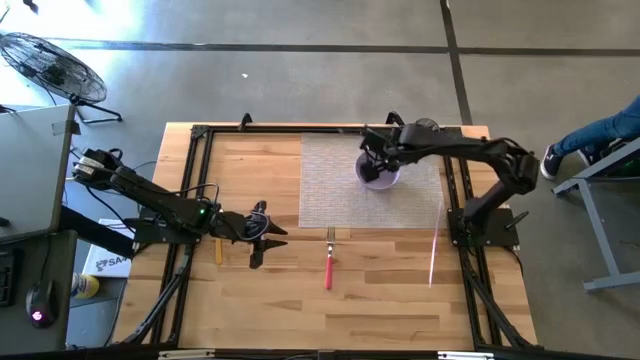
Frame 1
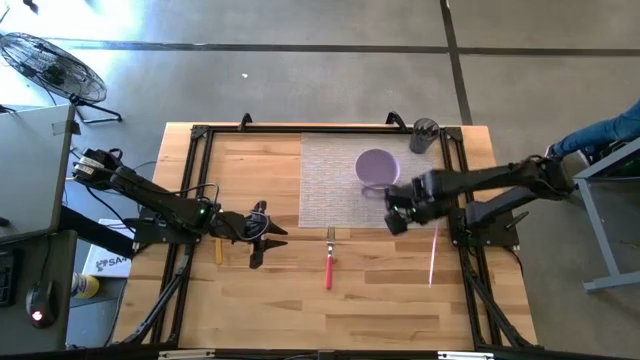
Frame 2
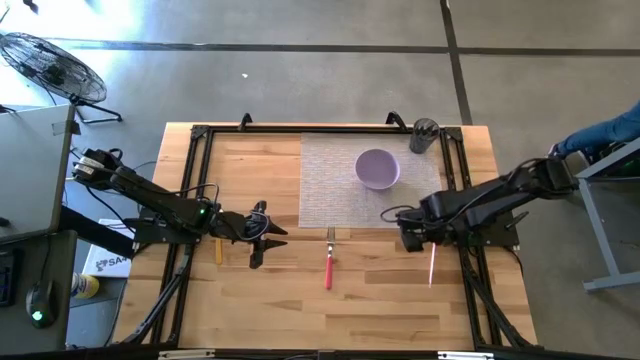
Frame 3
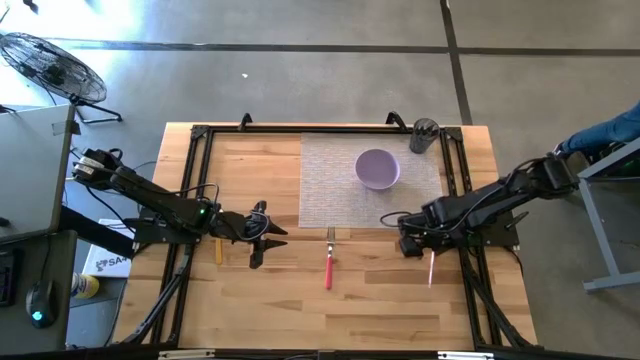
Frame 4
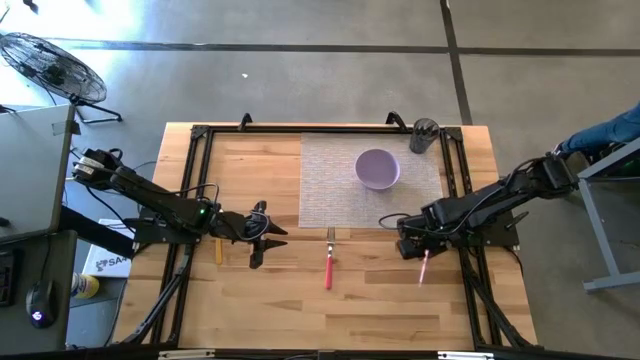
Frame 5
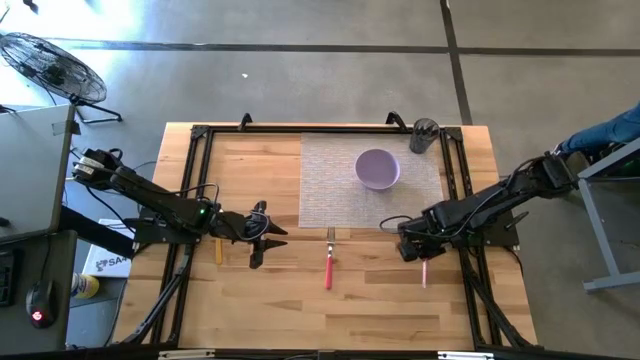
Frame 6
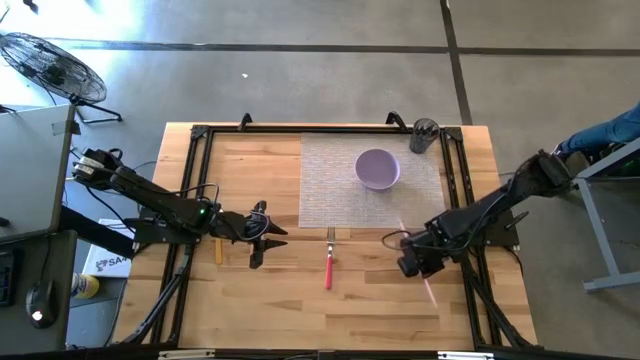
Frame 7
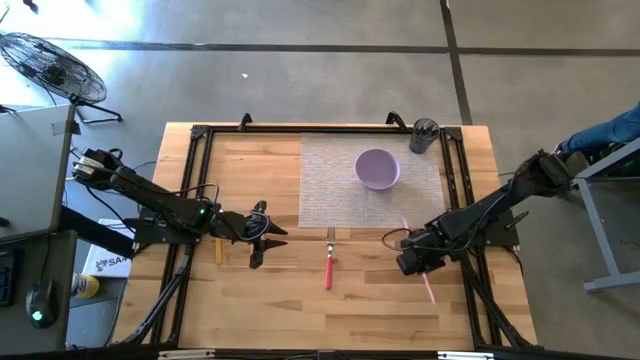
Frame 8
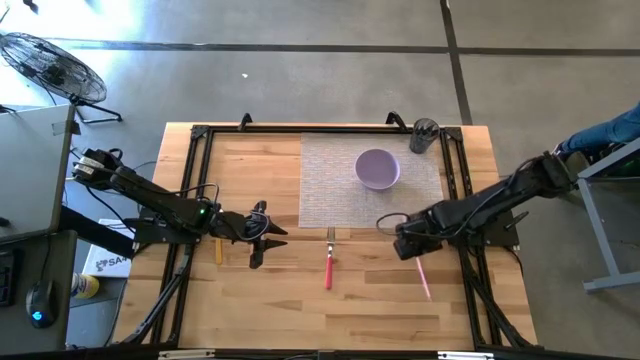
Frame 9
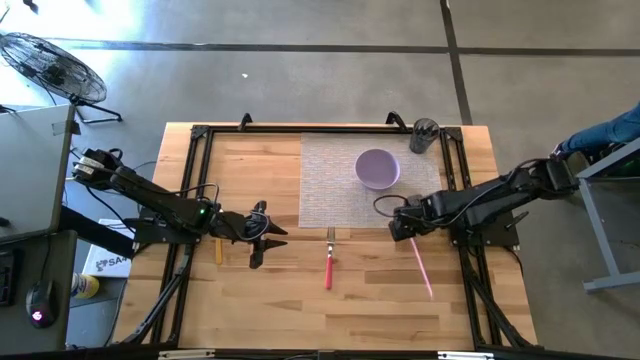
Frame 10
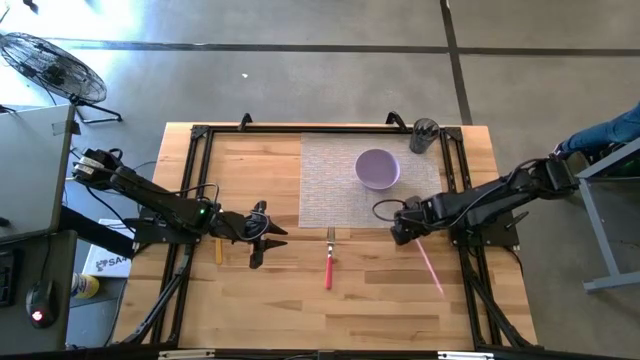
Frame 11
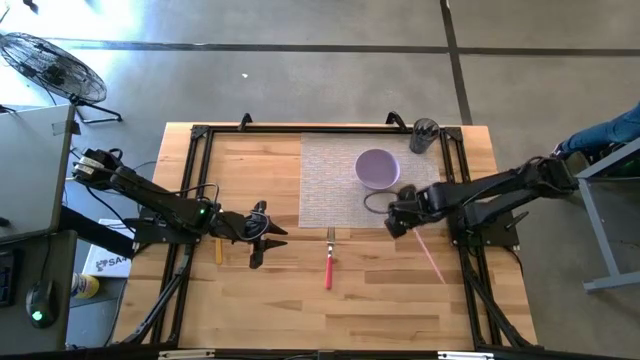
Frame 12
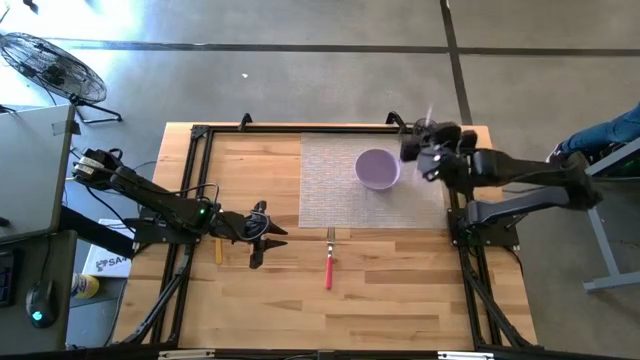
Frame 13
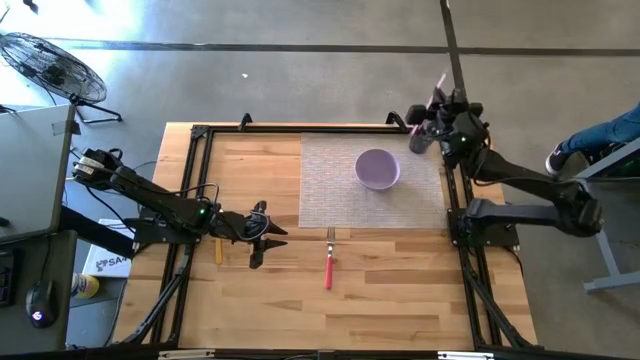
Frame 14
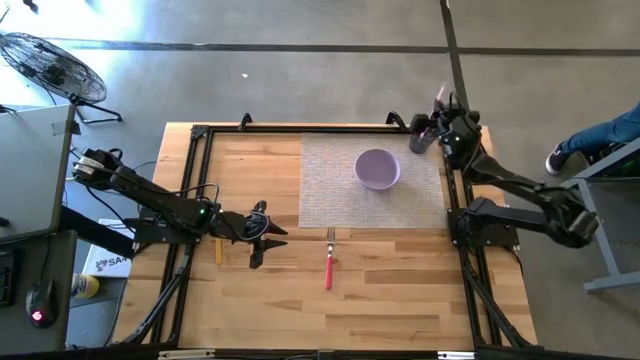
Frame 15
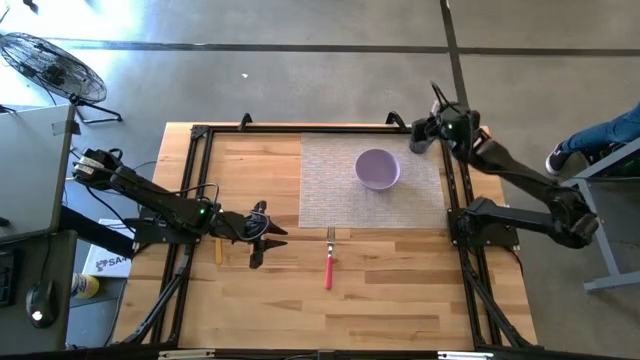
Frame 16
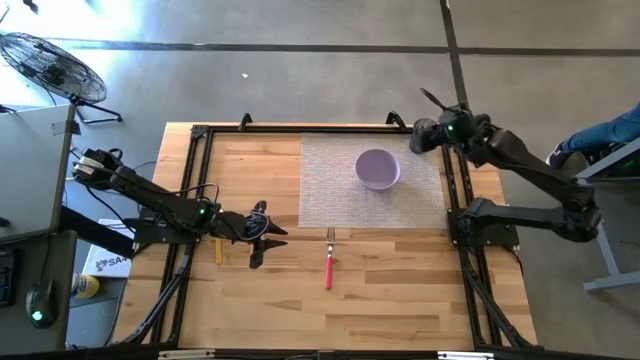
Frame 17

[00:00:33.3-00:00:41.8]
Task: Pick & Place Utensil
Put the pink straw into the blue cup

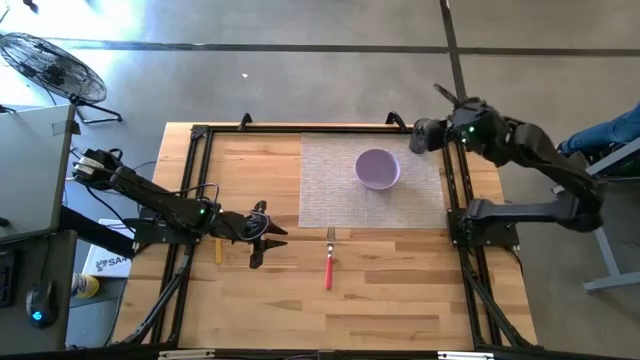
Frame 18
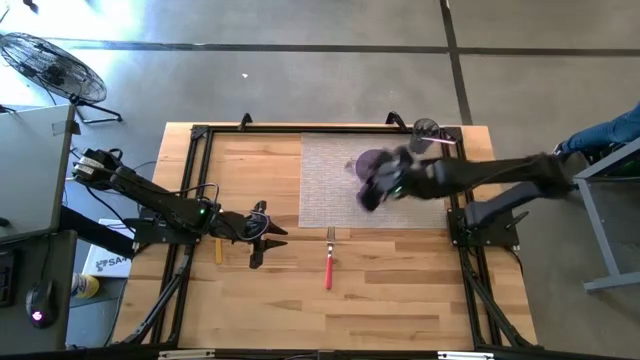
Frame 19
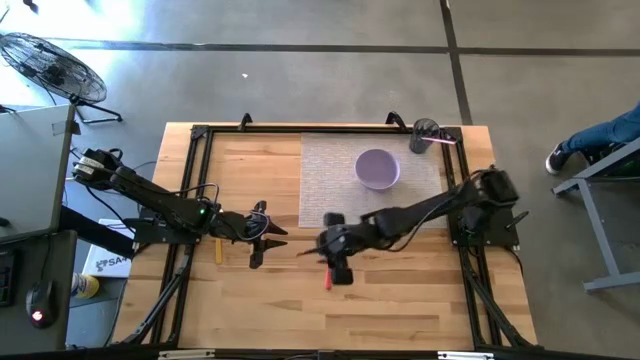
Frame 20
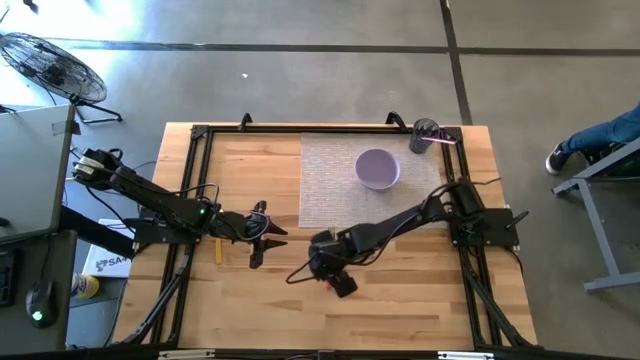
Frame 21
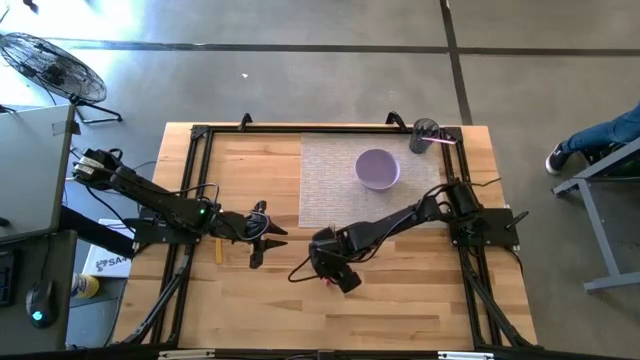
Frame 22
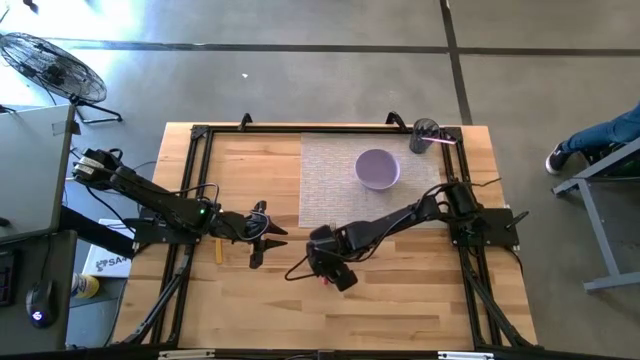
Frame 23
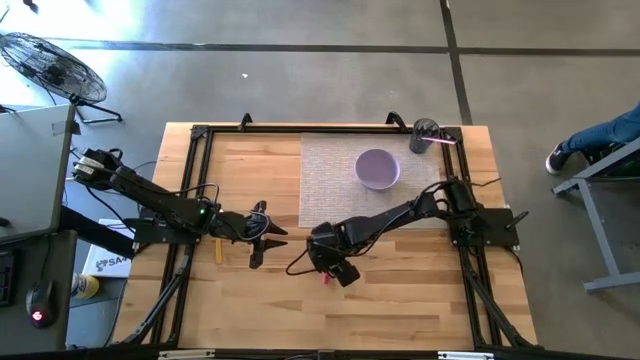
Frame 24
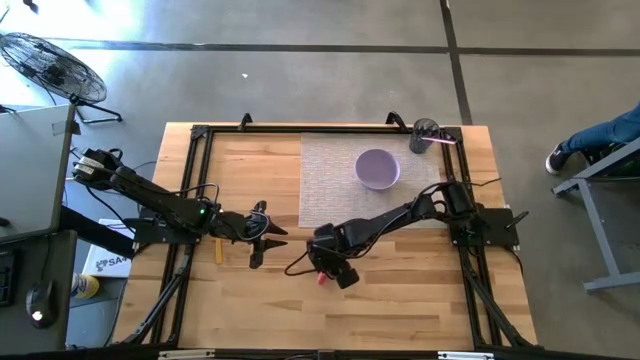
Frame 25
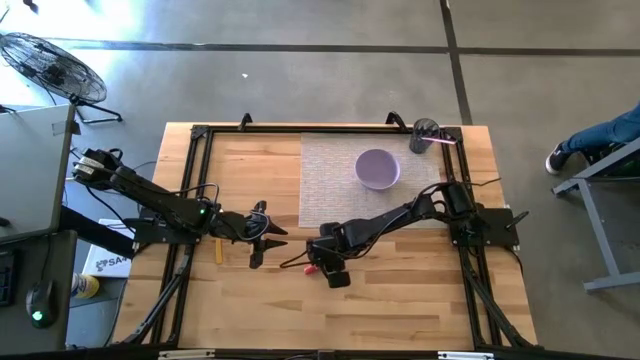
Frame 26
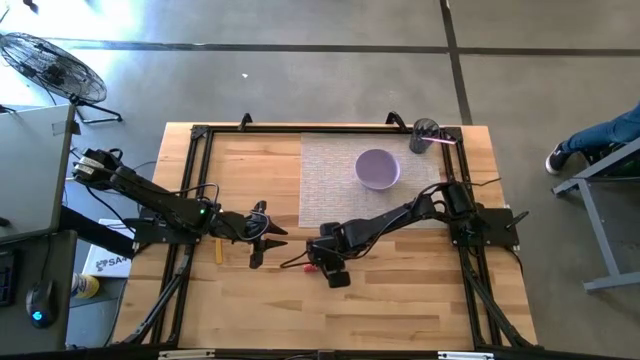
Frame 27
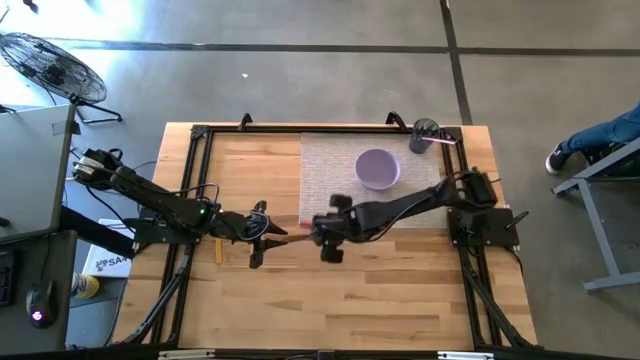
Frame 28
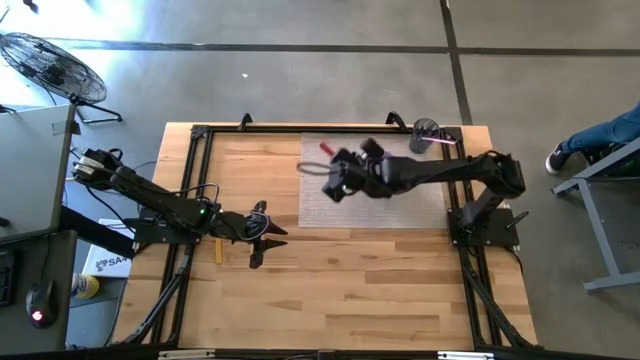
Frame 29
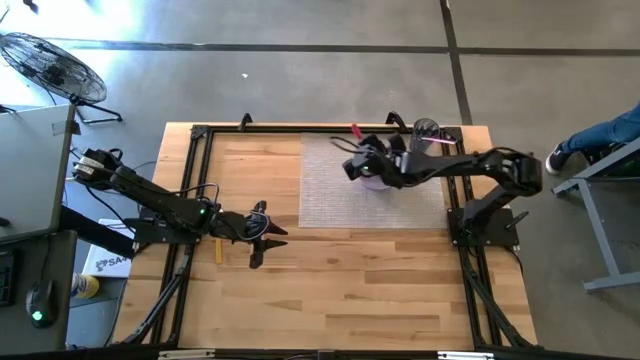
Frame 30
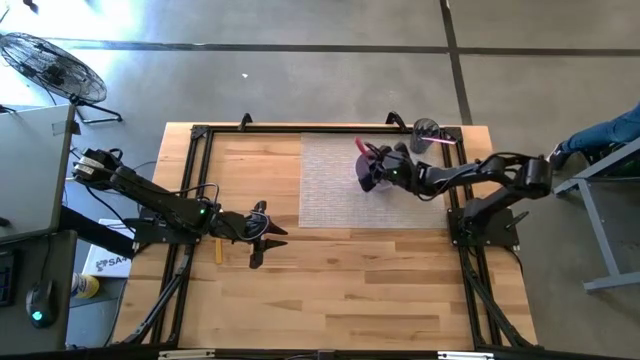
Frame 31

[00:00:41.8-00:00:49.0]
Put the pink fork into the purple bowl

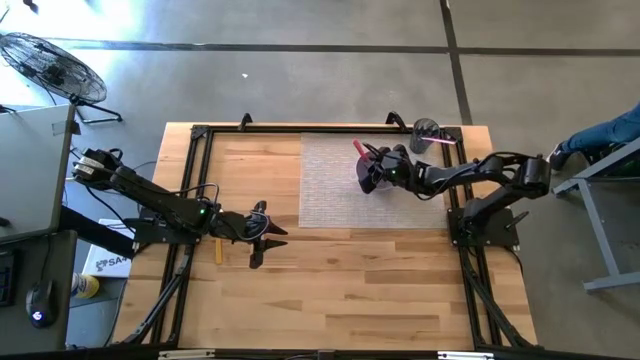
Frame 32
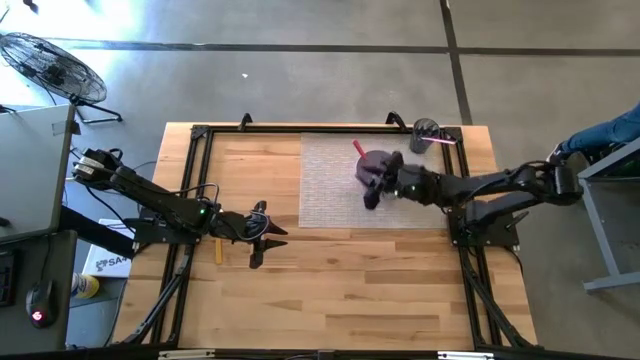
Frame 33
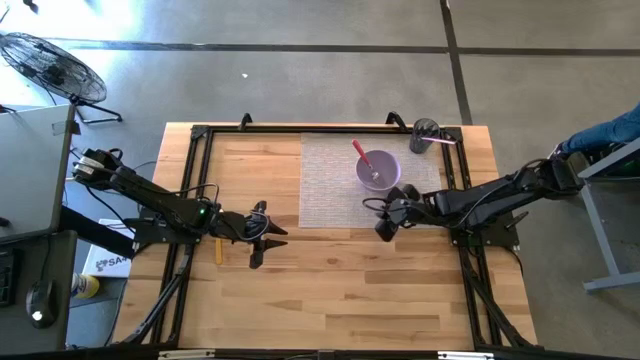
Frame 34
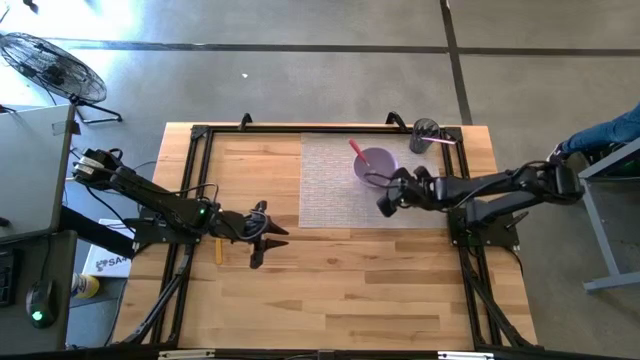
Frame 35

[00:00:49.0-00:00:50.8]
Adjust the purple bowl on the mat

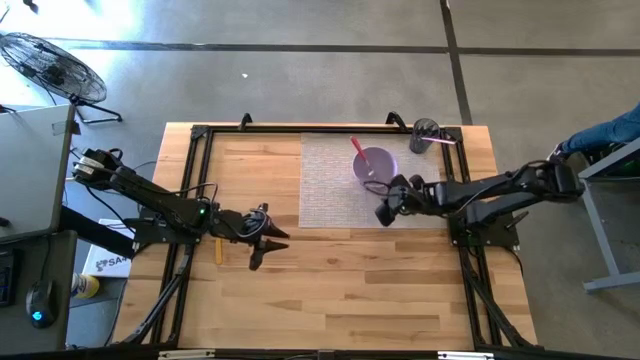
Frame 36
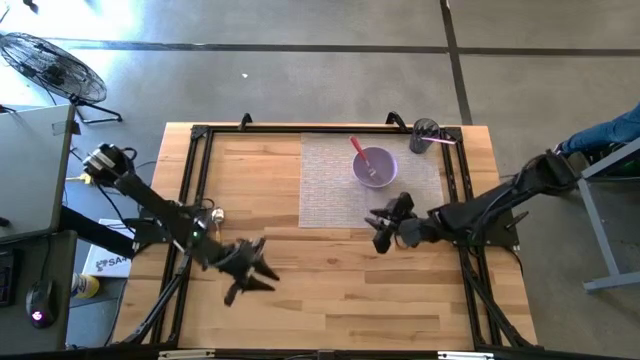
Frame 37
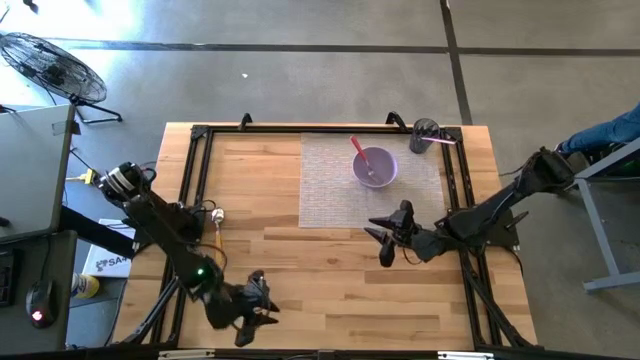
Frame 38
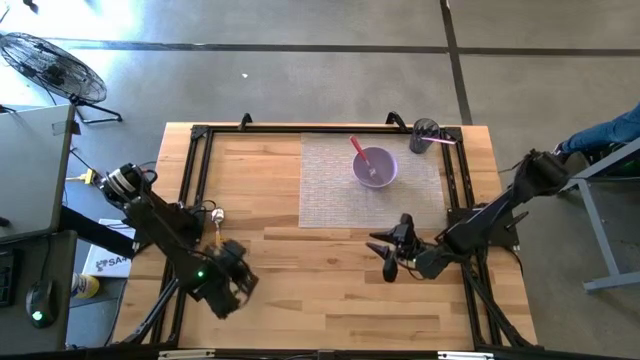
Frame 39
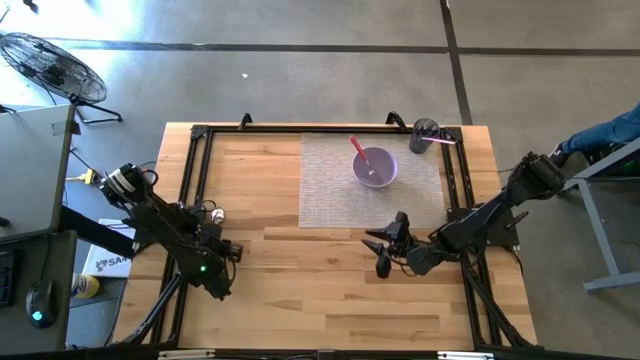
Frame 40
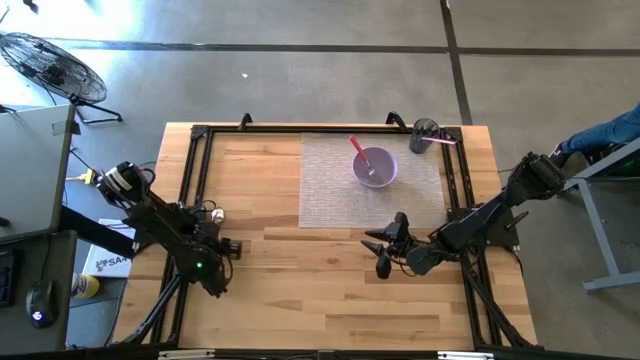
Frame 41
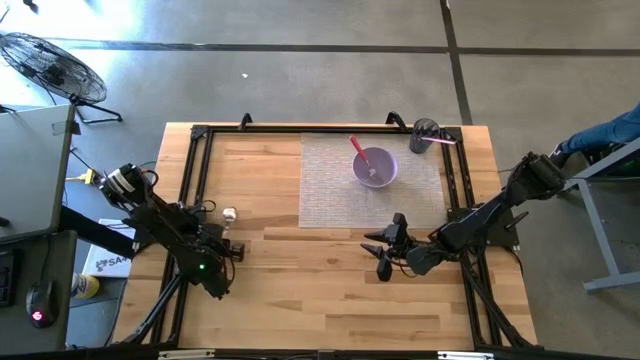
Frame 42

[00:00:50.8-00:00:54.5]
Put the spoon into the bowl

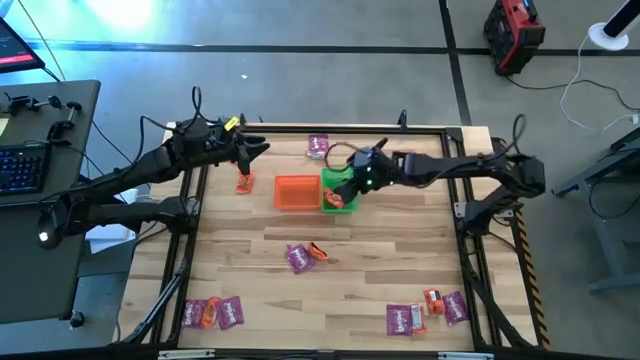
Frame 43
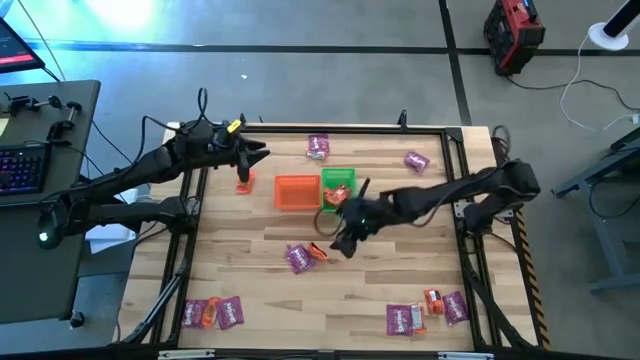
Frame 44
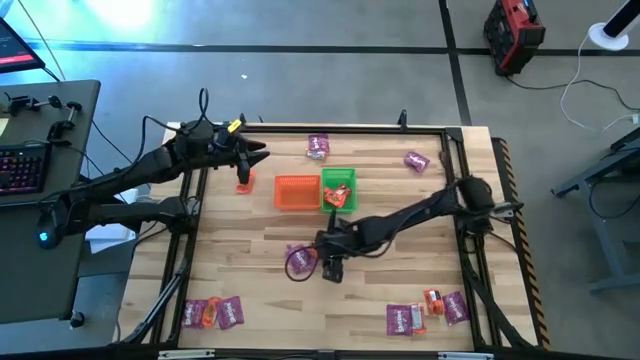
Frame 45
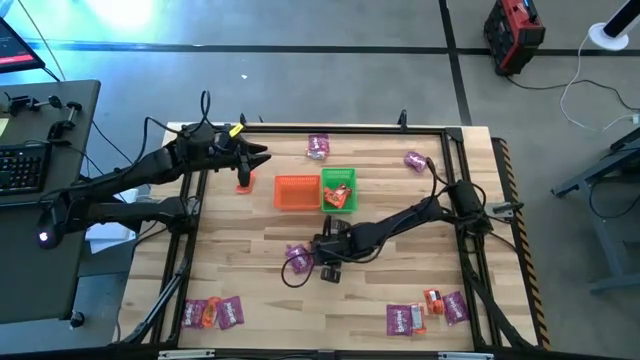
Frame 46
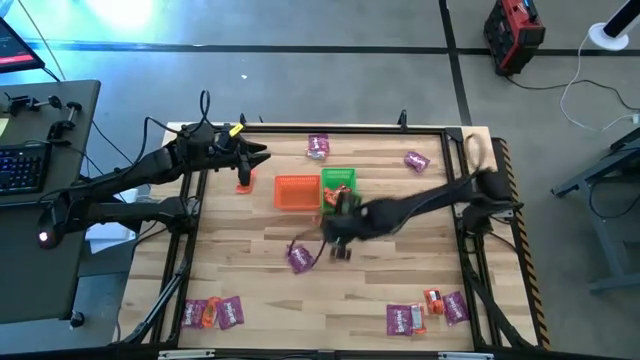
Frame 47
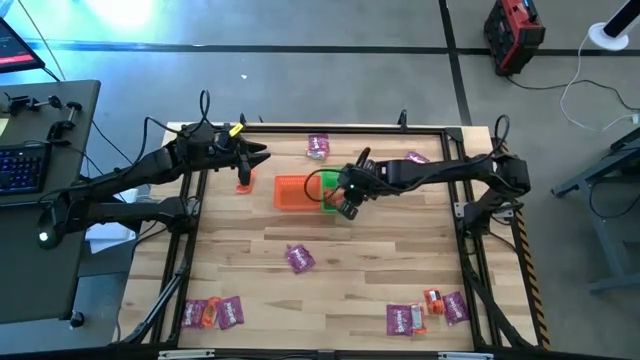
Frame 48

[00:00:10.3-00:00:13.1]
Task: Sort candy by brand, put in halloween buckets
Put the orange chocolate into the green bin
